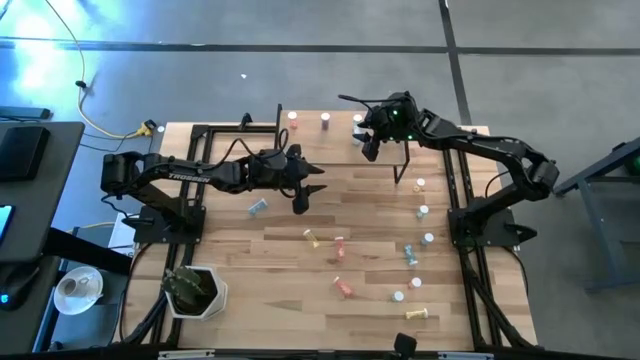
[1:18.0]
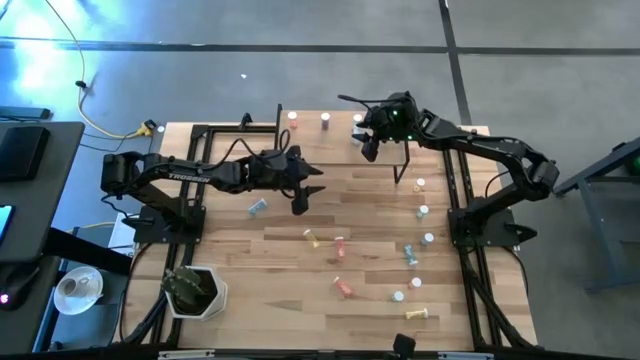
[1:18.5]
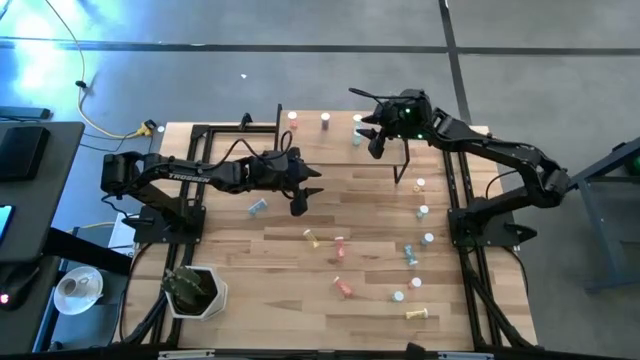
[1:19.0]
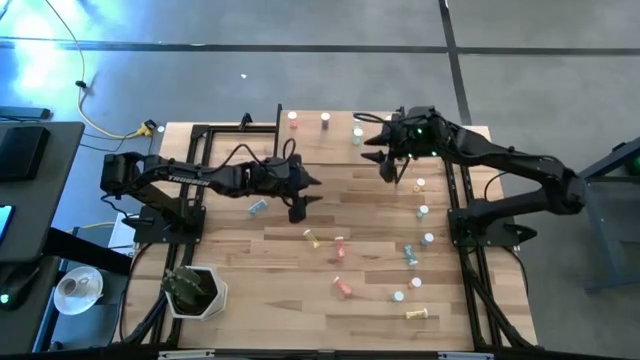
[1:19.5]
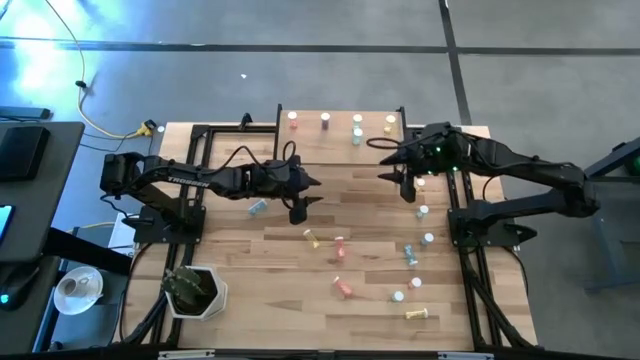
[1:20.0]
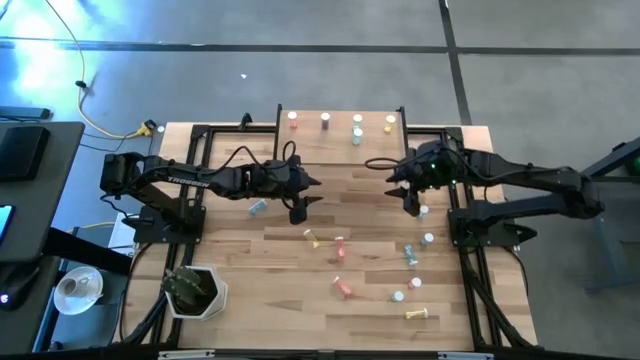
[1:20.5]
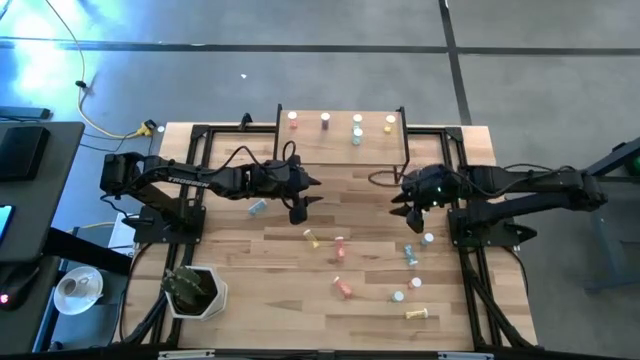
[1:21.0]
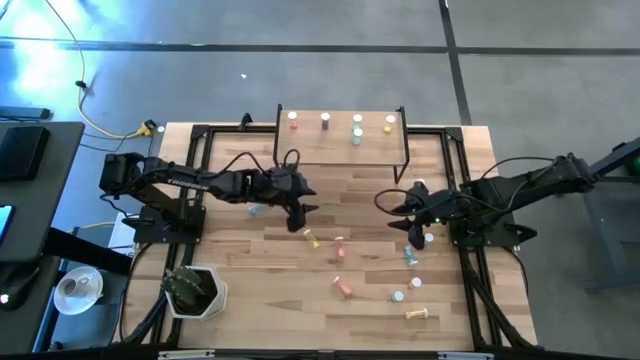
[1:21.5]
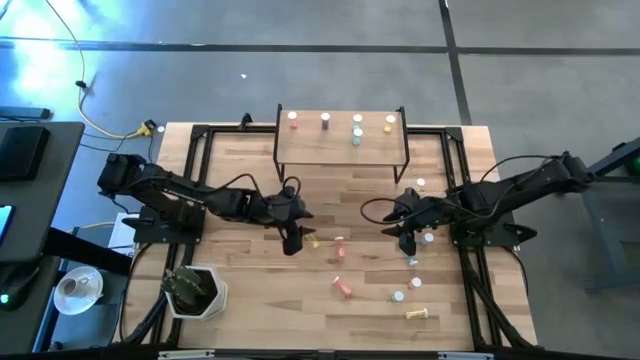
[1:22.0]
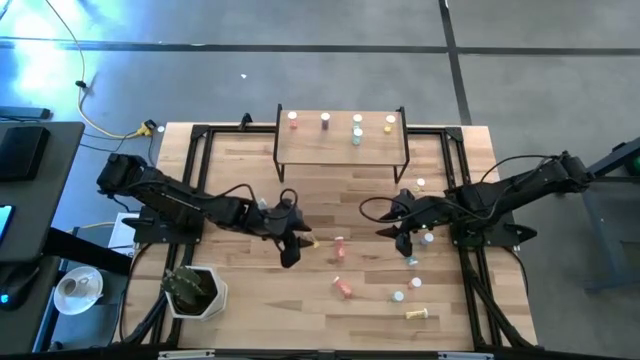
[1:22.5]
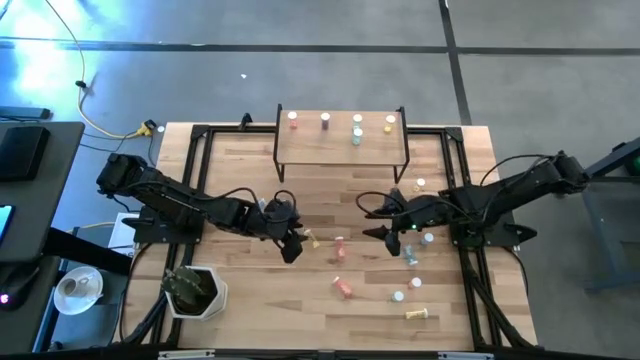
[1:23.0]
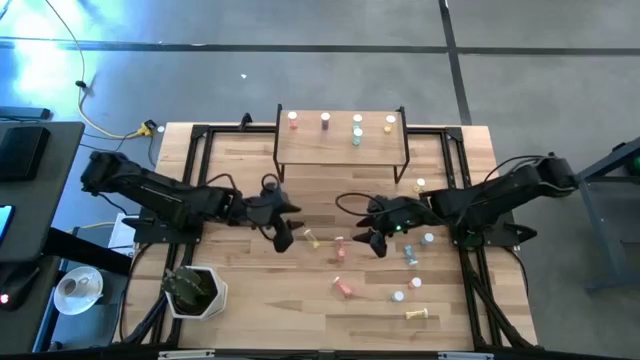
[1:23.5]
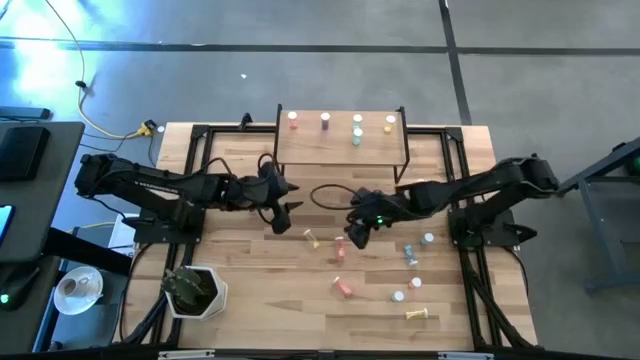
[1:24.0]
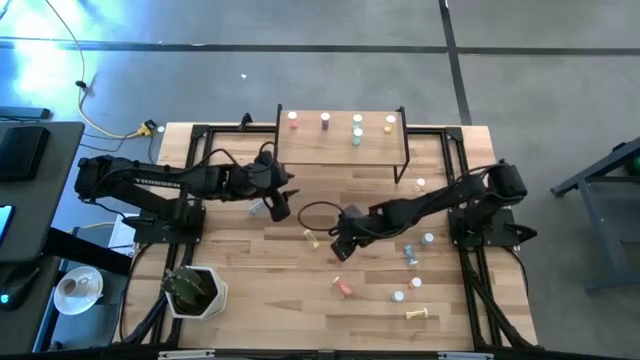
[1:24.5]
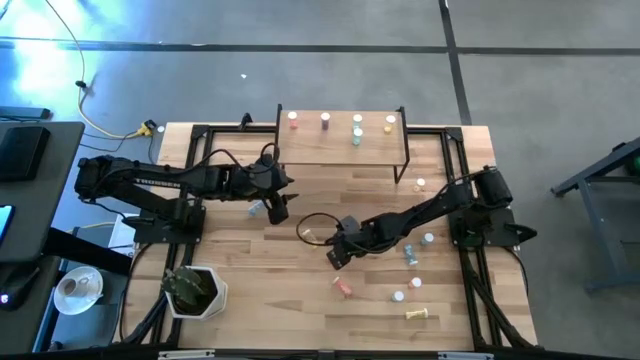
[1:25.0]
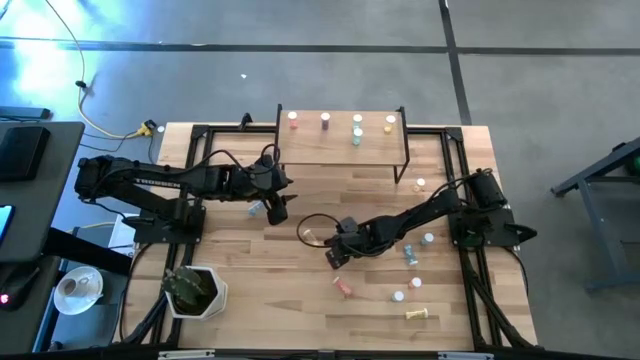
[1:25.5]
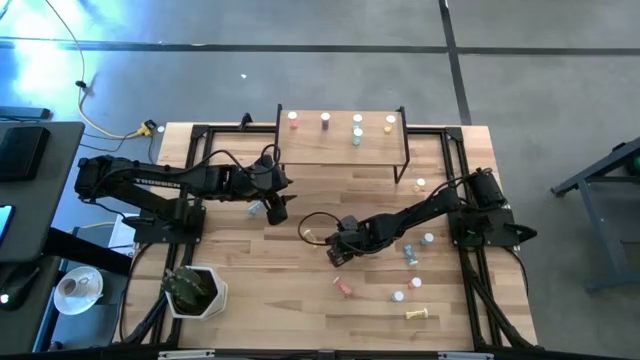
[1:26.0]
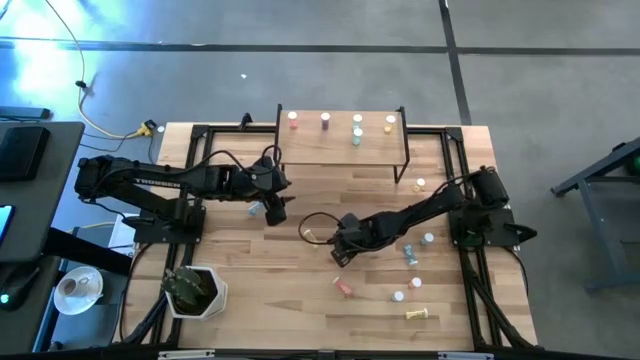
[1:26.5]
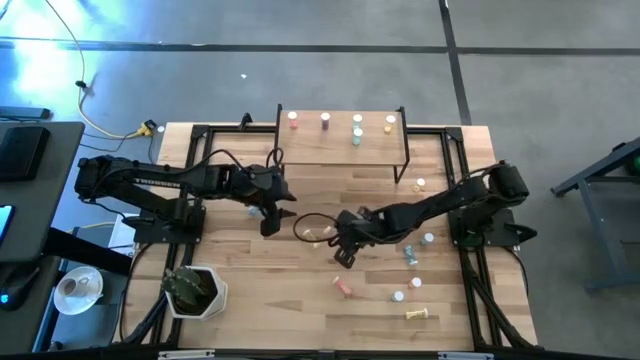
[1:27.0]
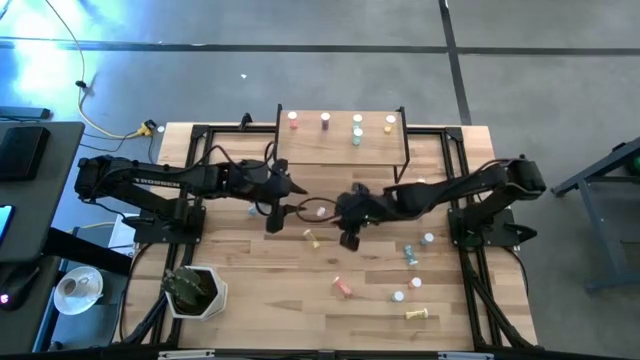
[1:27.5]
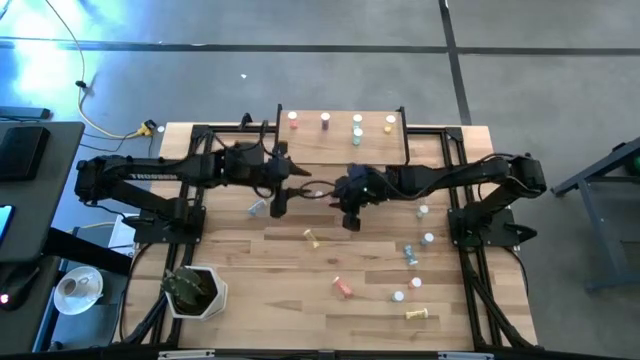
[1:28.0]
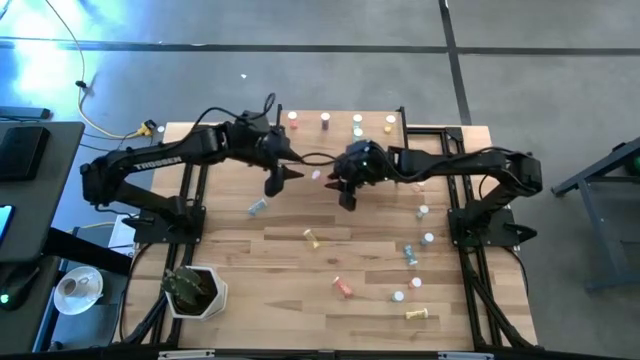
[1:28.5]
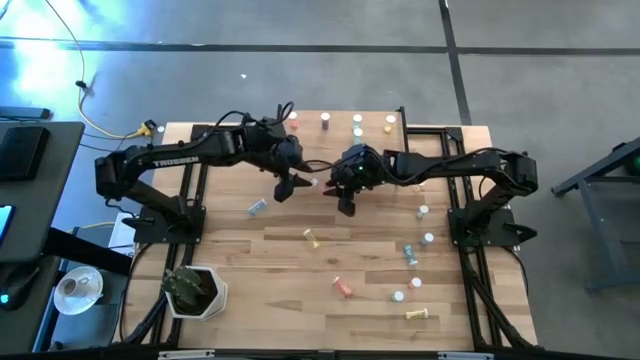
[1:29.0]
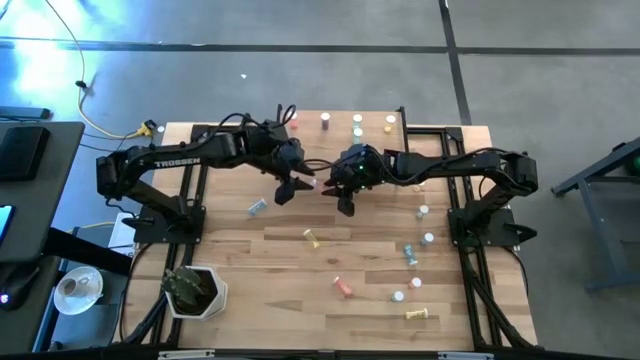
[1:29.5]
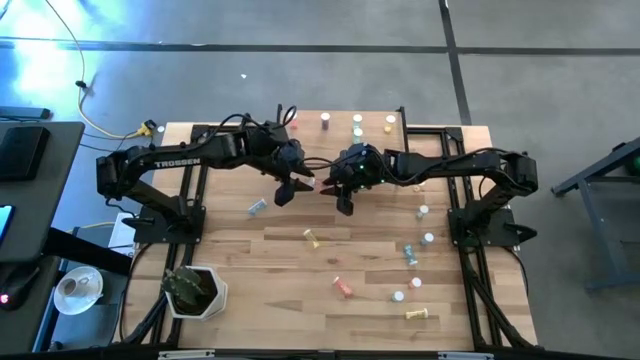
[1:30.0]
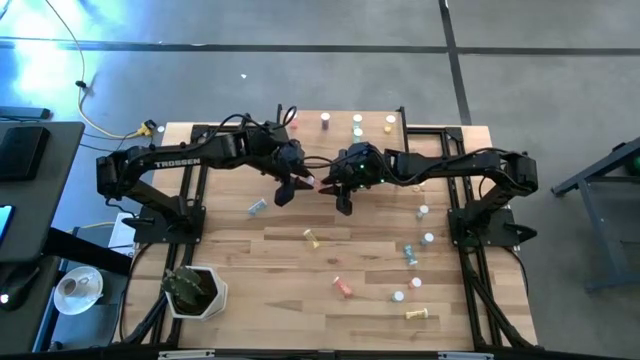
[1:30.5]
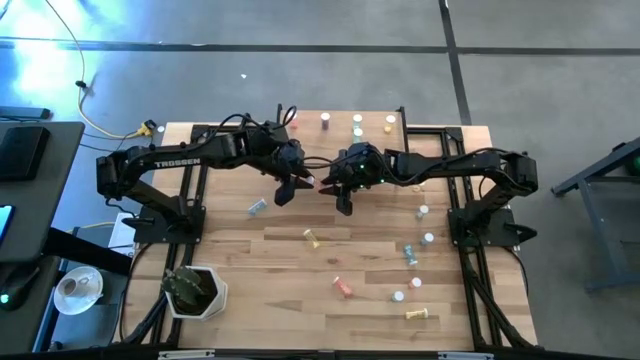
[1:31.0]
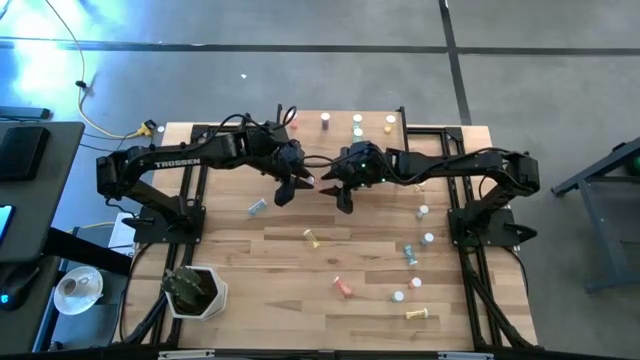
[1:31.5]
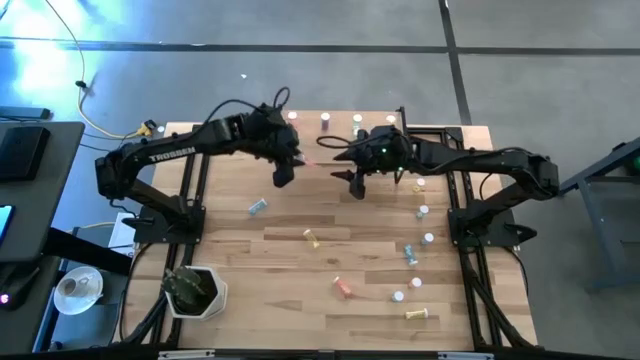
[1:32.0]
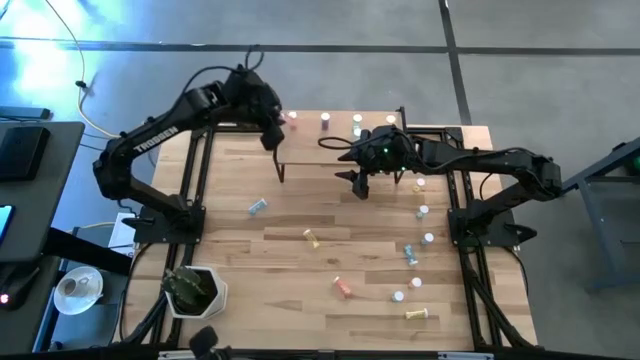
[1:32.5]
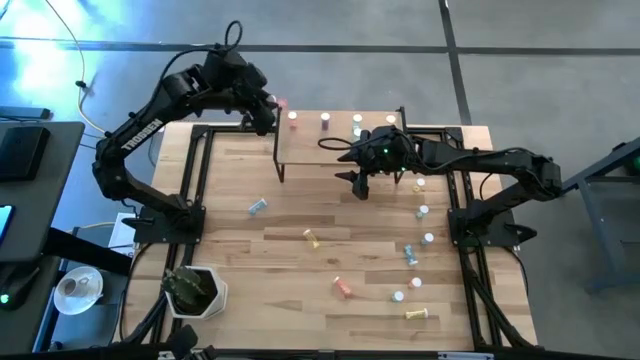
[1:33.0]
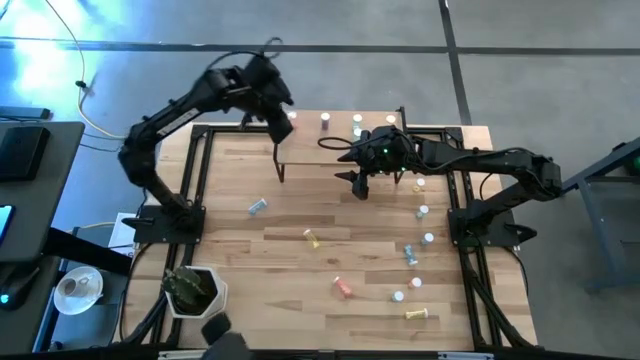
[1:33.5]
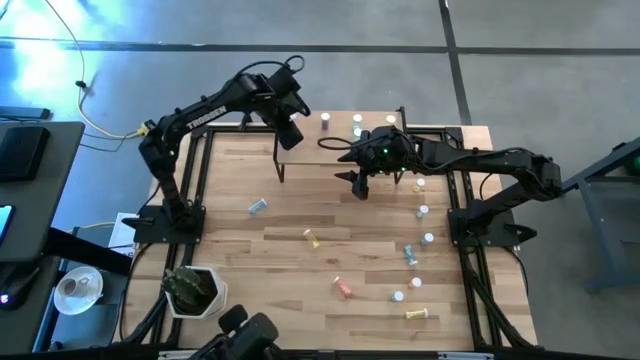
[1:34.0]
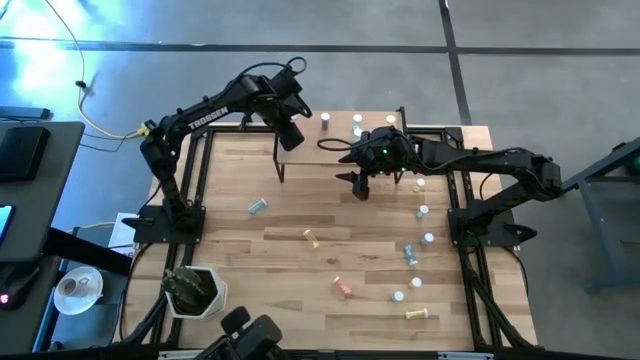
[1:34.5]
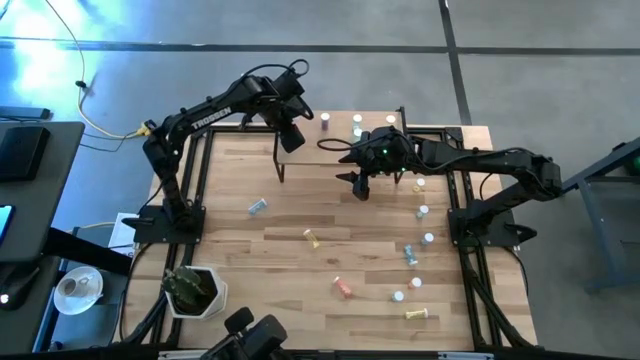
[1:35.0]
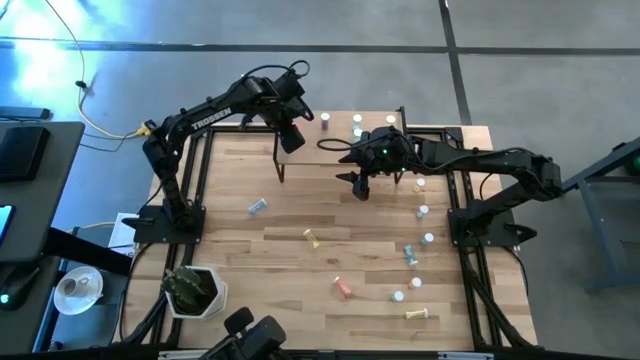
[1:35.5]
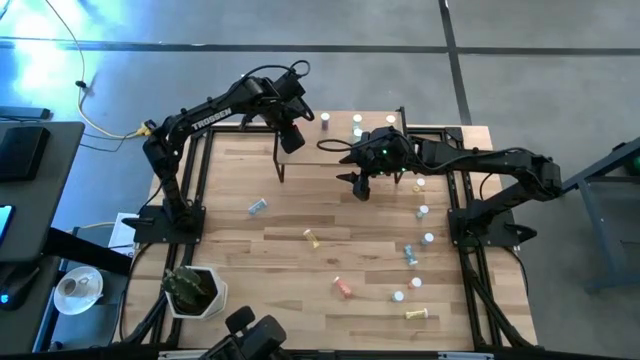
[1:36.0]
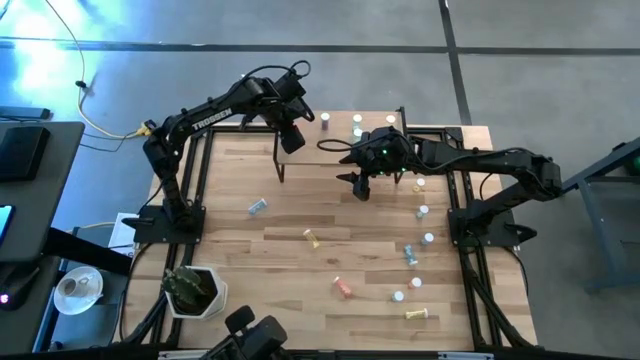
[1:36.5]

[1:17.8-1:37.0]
Task: Pick and place medicine bottles onto shelf by color
Put the pink pill bottle on the shelf aligned with the other pink pill bottle

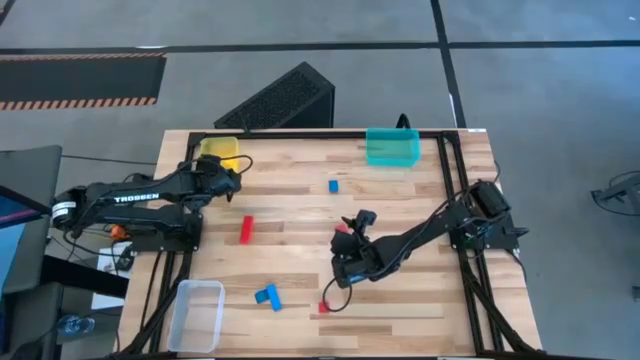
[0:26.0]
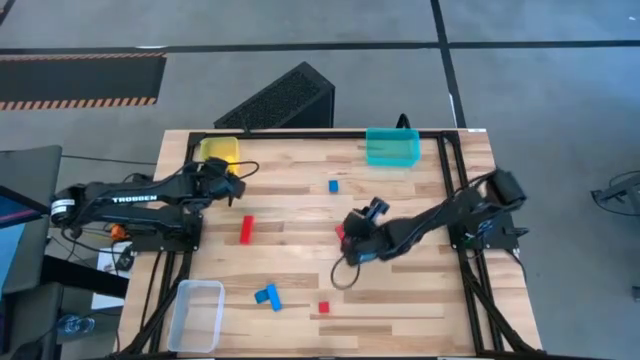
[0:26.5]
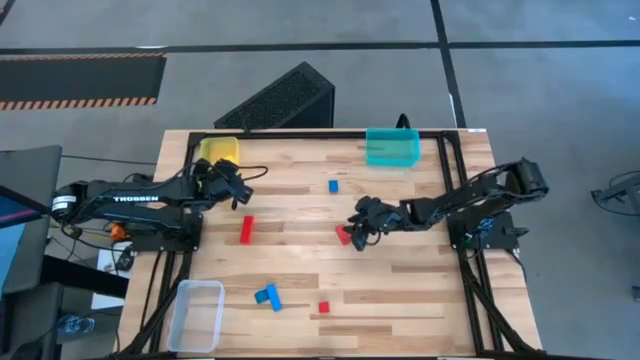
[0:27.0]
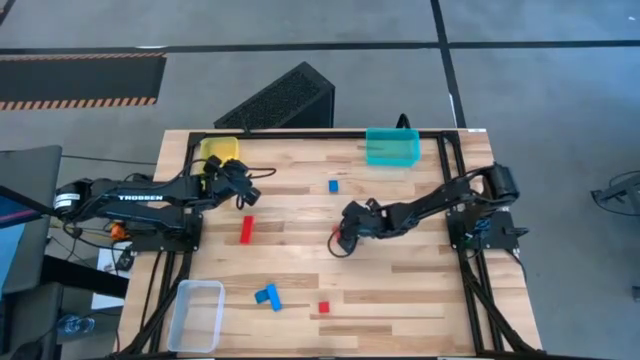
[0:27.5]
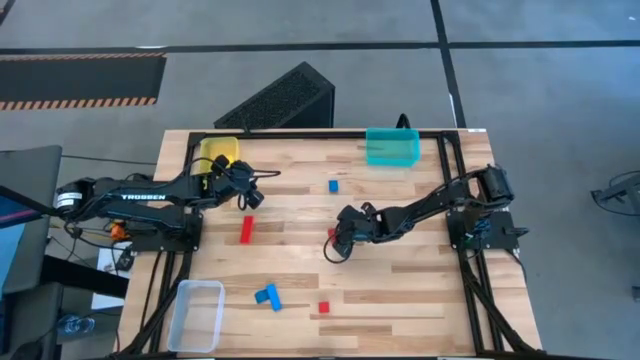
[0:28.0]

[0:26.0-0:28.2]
Task: Sort & place blocks by color
Put the top right red block into the blue bin
